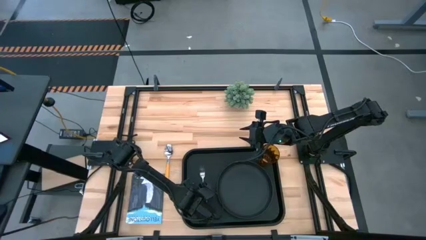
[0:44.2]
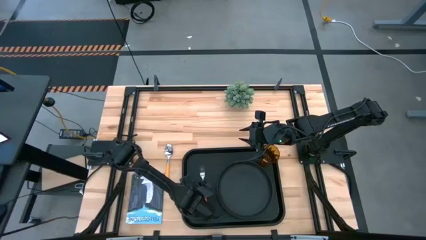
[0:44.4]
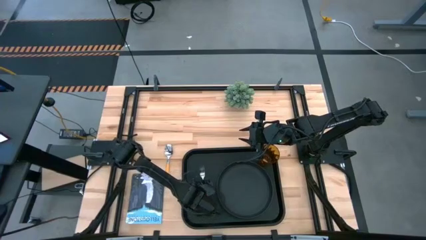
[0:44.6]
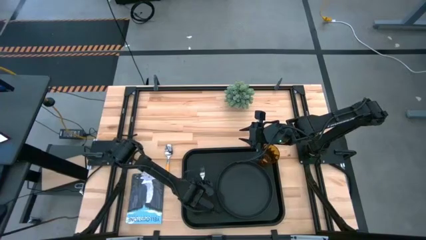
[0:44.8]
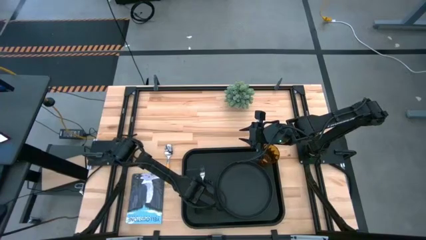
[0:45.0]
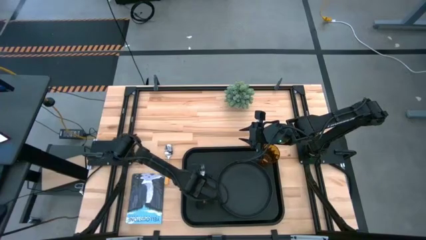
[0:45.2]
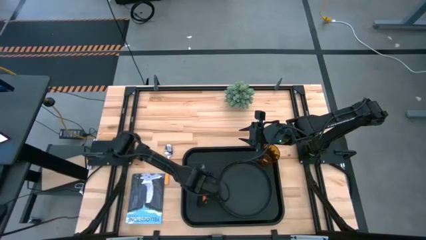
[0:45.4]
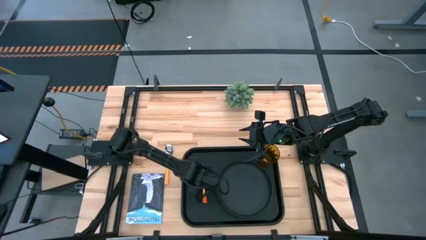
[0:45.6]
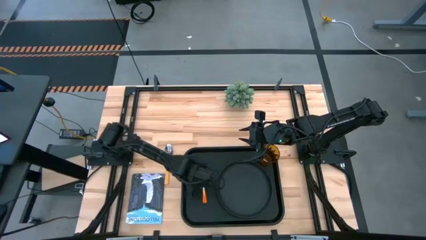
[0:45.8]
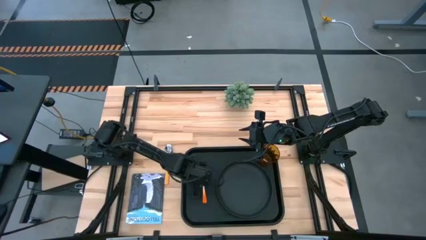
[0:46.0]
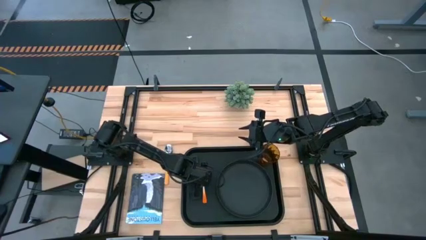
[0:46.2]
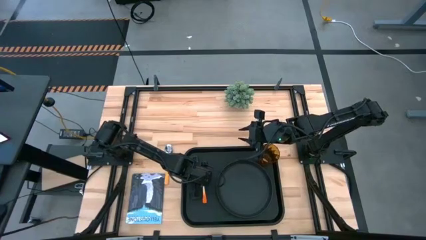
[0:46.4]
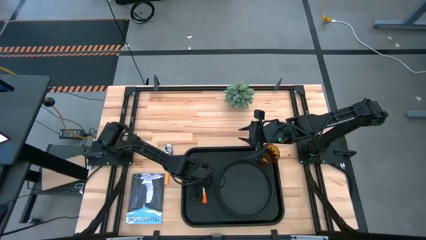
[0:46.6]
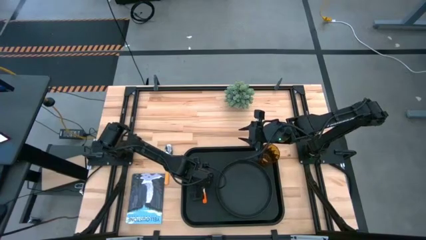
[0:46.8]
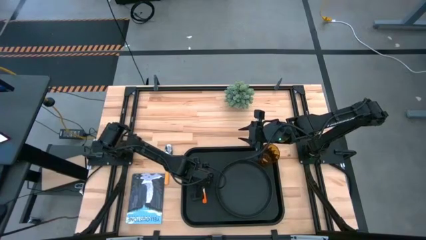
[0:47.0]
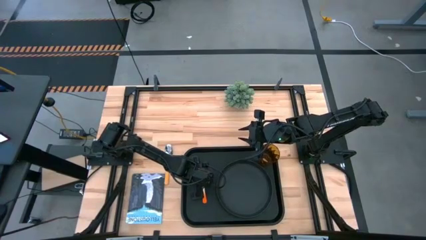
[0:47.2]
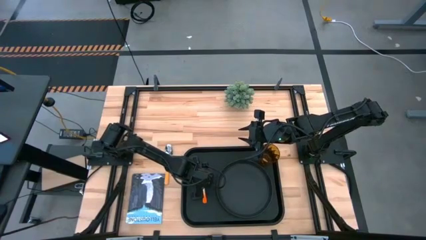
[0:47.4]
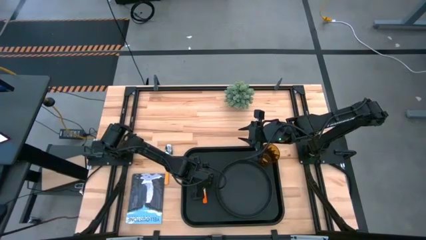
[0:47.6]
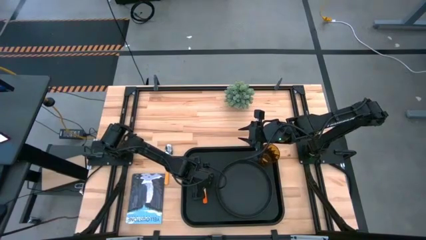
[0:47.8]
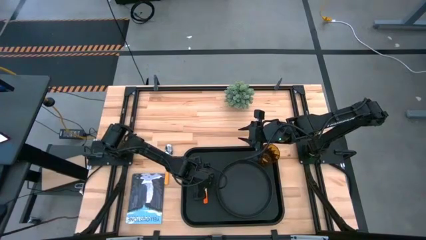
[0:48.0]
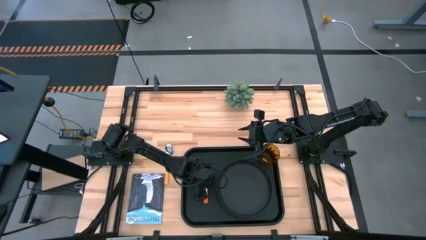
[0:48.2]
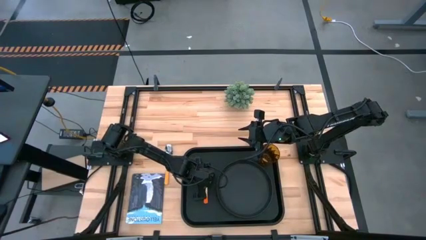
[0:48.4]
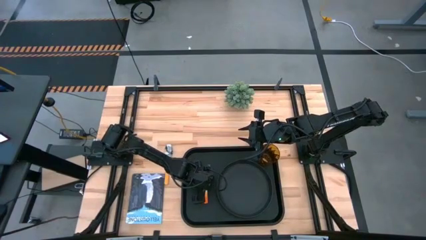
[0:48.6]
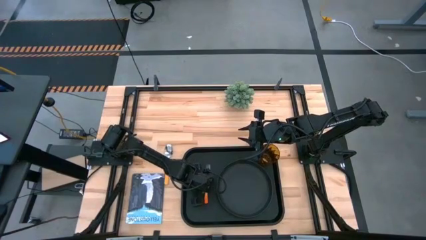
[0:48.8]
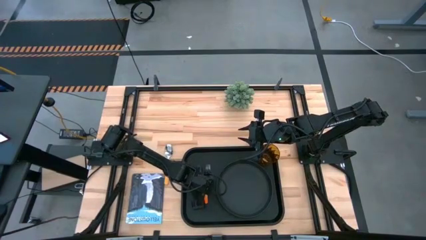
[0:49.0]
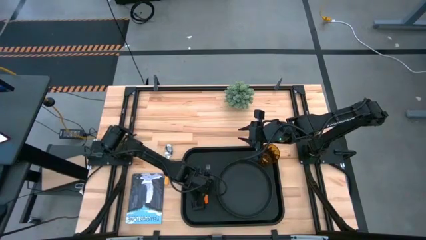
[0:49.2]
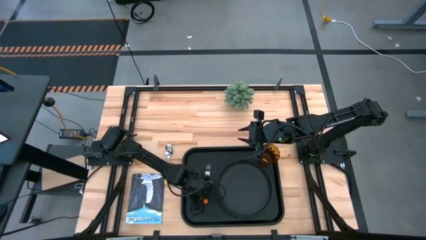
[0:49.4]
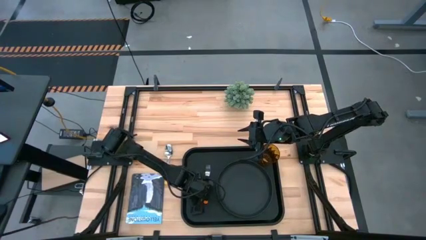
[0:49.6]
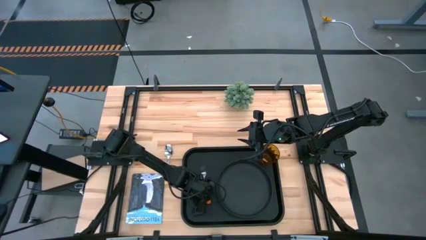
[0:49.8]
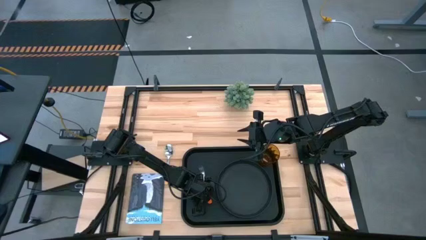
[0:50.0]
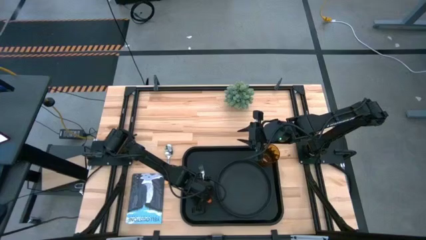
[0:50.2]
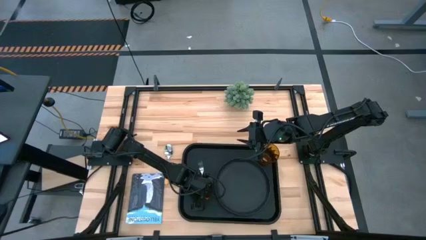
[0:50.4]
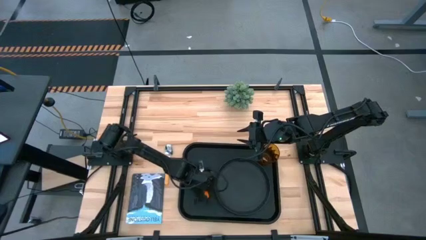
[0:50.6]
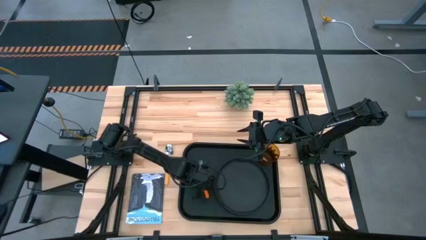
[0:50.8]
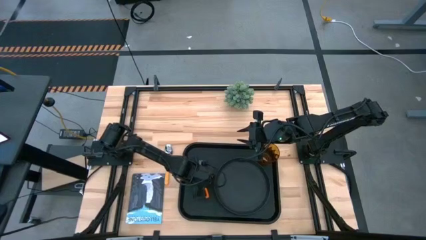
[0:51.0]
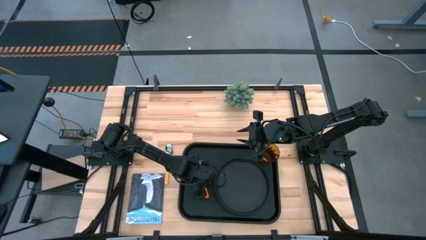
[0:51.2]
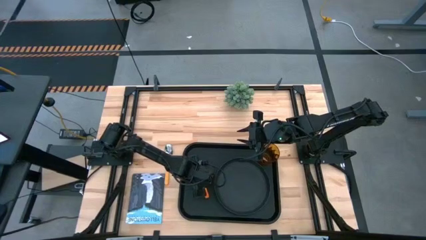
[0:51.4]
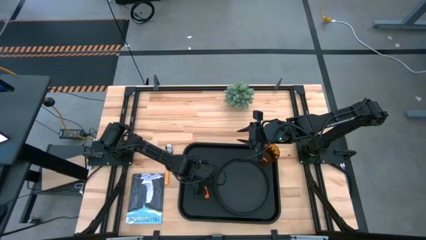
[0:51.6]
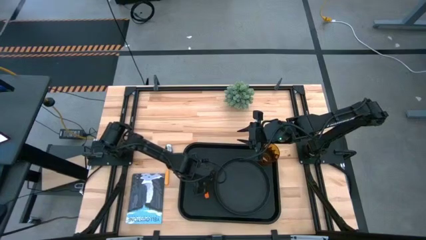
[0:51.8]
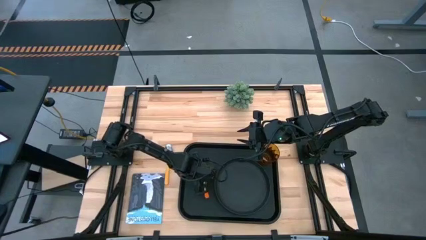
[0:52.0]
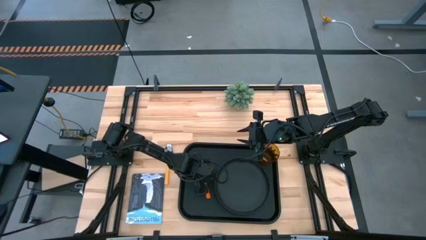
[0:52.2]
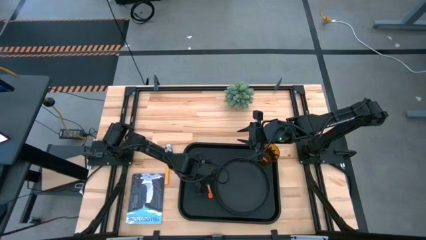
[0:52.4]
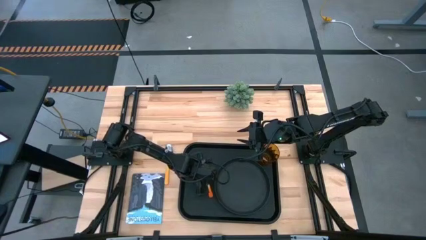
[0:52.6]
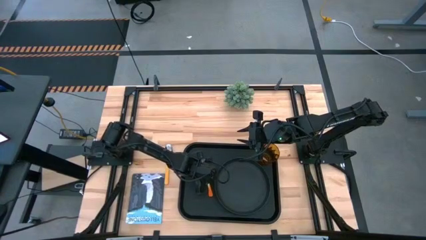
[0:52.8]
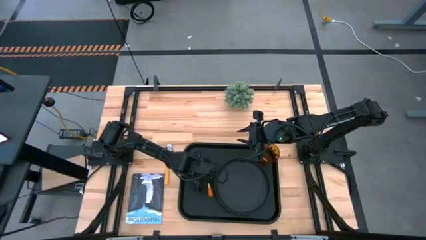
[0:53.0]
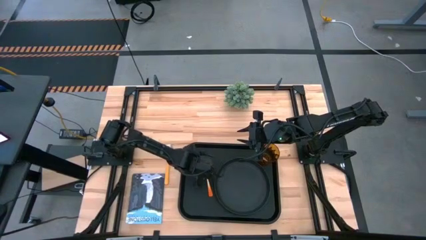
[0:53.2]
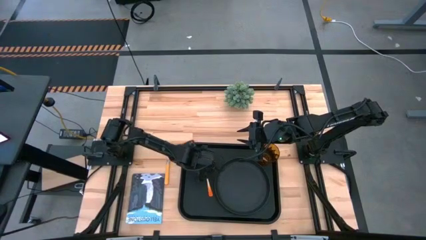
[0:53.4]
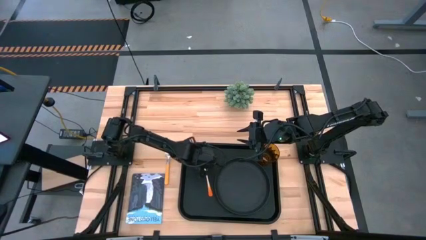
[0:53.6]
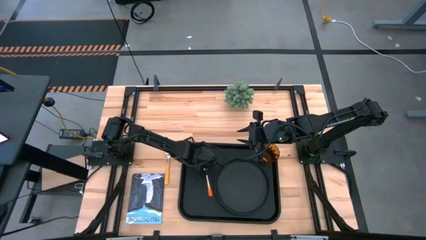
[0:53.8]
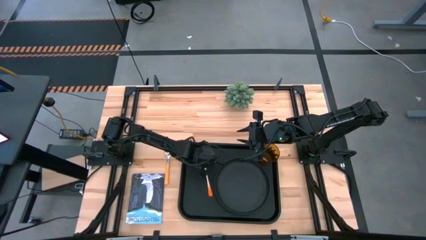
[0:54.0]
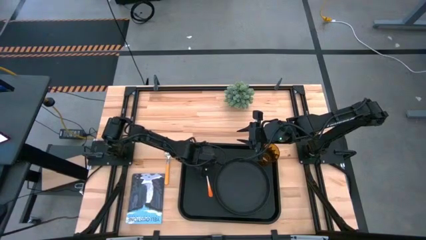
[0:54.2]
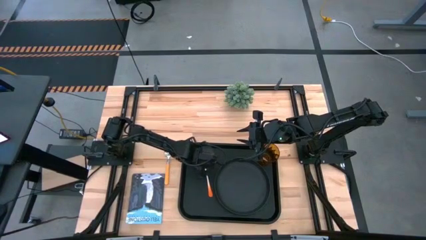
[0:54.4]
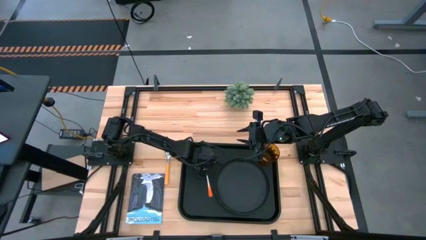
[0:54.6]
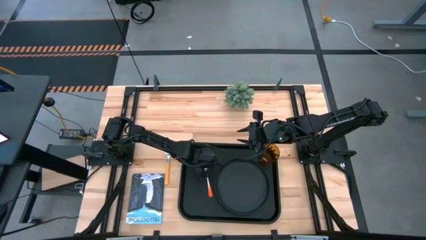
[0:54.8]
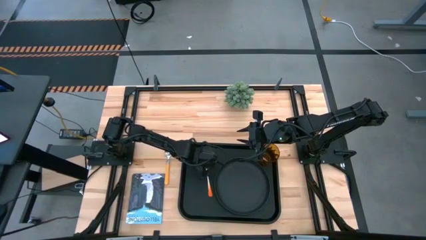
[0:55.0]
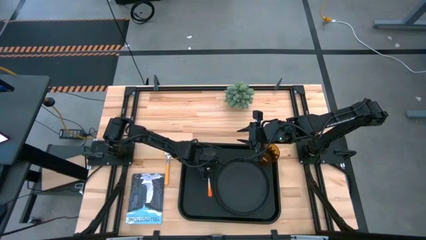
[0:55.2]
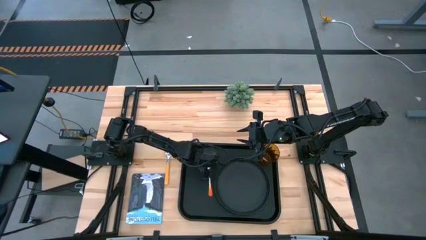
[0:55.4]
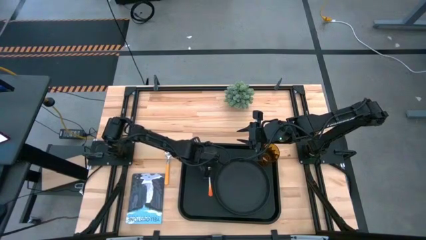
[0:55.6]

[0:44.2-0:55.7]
Task: Pick and place plate/cup/fork/spoon on tray
Put the orange fork on the left side of the black plate

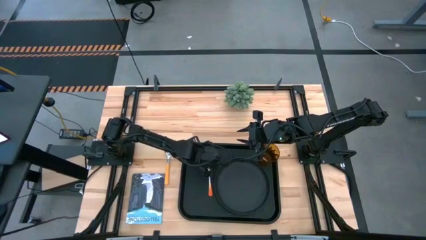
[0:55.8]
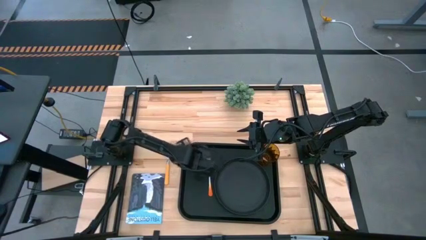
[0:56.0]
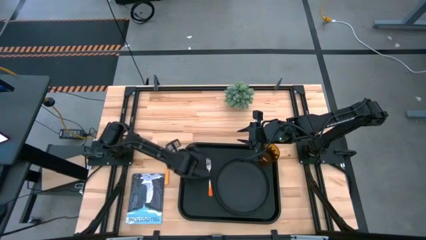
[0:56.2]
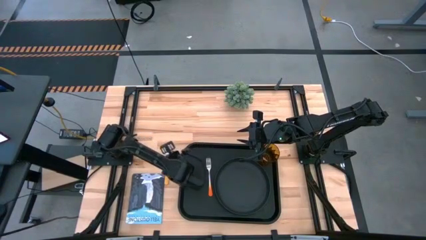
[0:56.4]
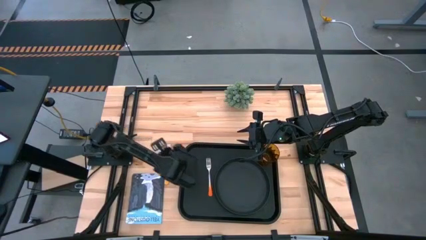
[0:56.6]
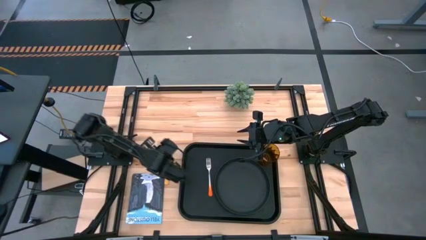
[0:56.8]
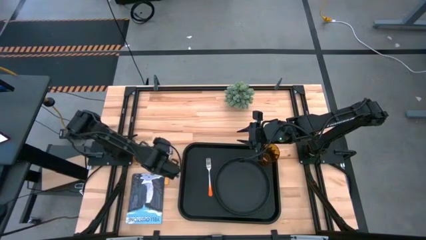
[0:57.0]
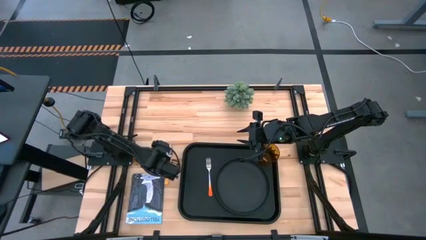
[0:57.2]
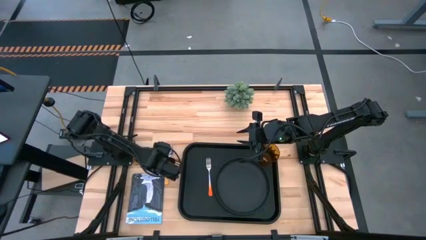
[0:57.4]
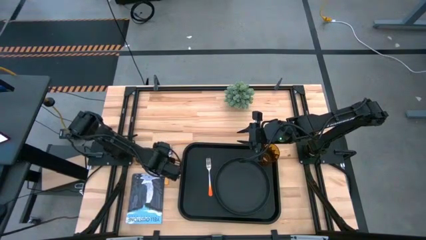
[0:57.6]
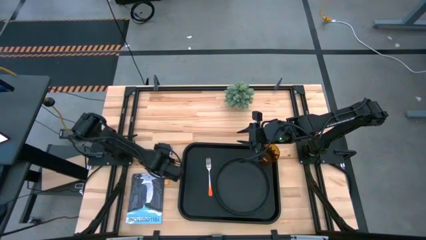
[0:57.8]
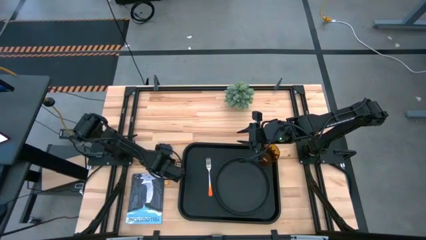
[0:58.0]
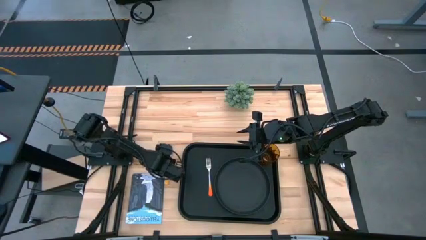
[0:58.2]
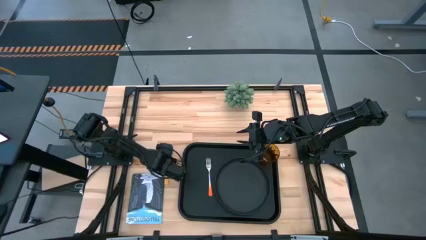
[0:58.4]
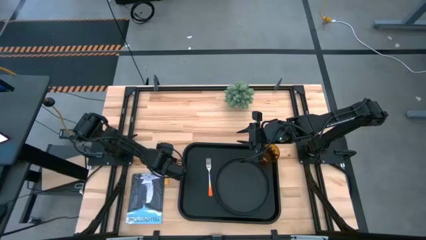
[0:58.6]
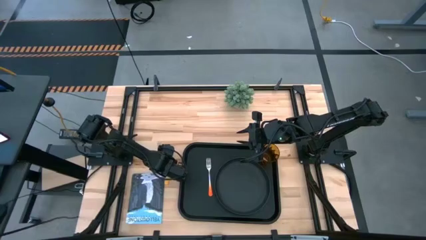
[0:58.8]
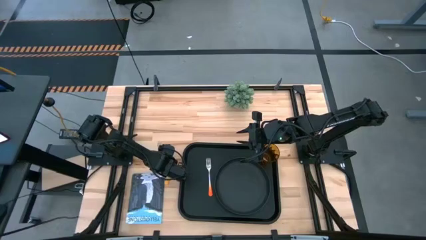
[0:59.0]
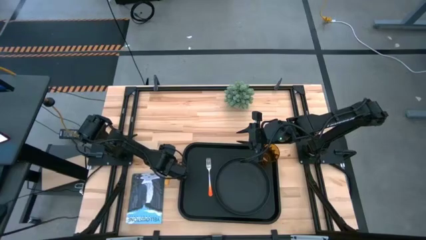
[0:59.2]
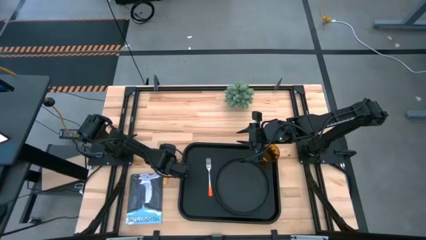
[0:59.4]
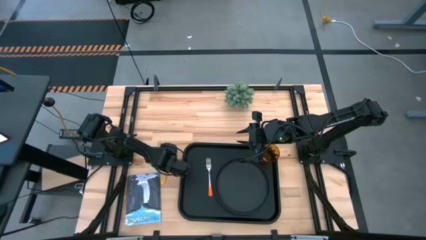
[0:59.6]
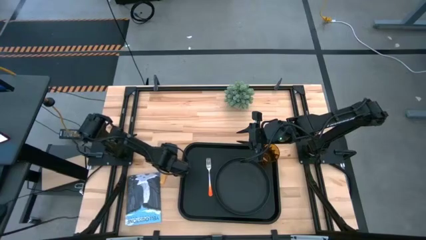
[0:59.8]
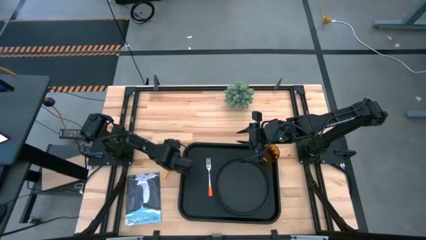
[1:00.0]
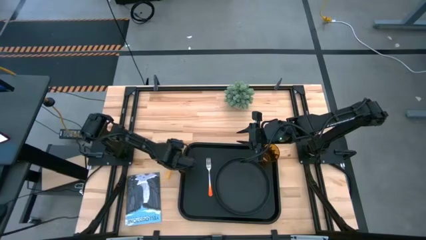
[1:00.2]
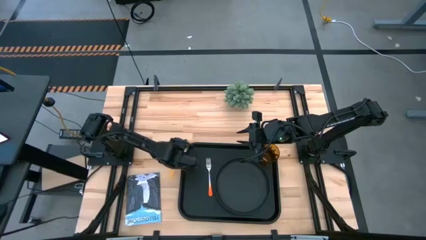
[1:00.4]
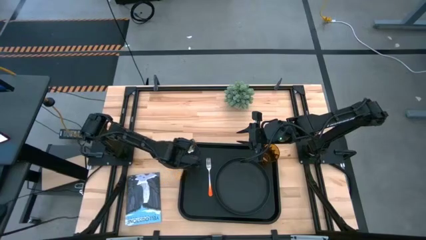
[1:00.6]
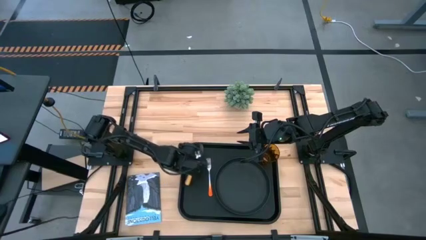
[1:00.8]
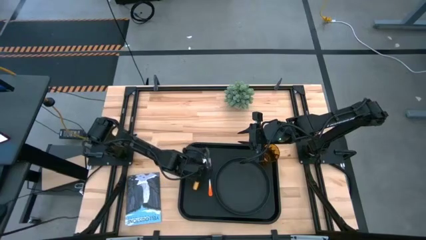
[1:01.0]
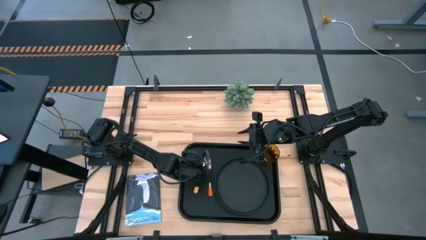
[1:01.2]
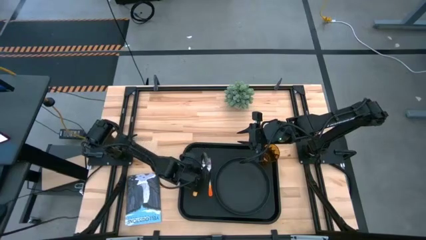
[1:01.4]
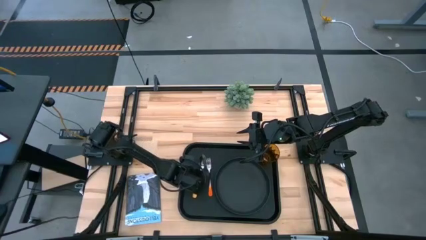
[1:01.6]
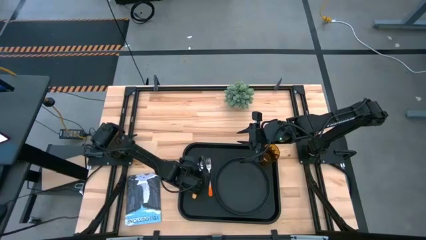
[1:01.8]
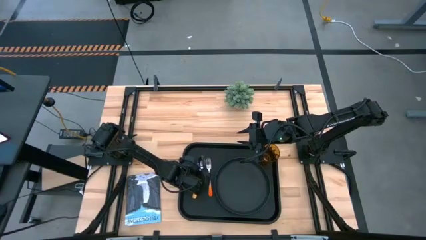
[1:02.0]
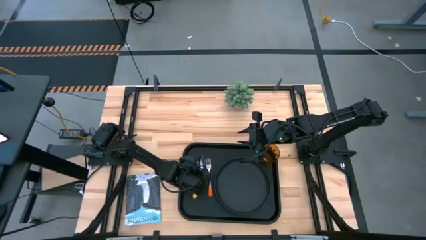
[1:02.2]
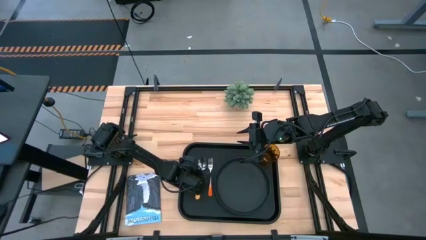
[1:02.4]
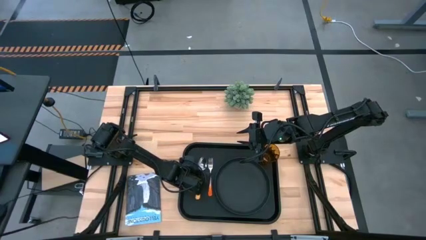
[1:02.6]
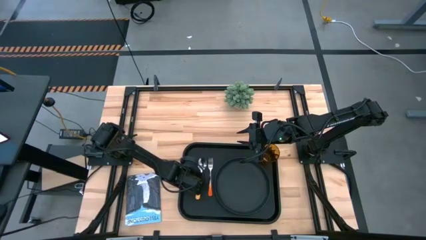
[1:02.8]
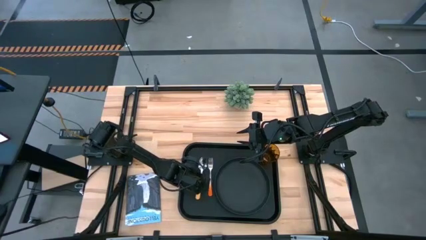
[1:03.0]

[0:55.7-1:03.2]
Put the yellow spoon on the left side of the orange spoon
